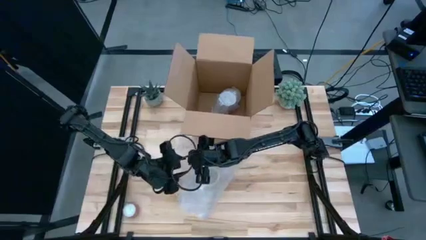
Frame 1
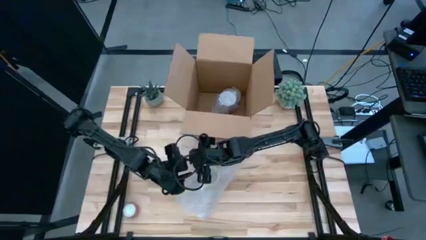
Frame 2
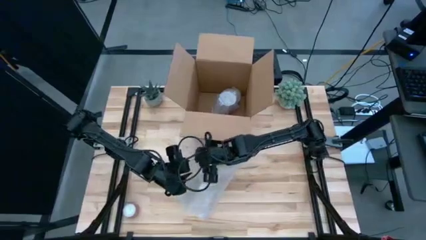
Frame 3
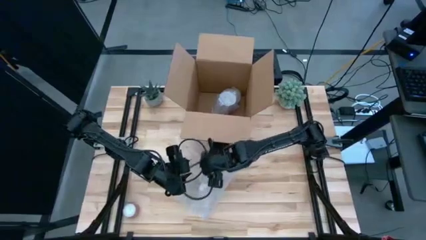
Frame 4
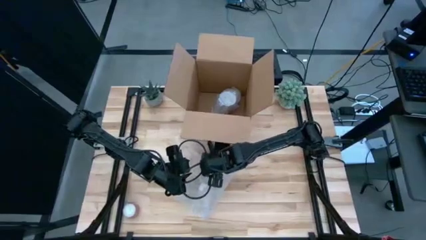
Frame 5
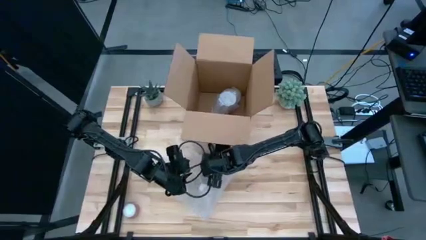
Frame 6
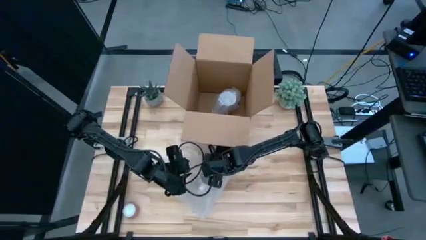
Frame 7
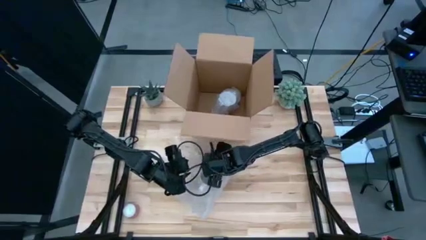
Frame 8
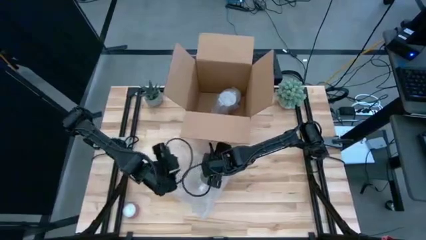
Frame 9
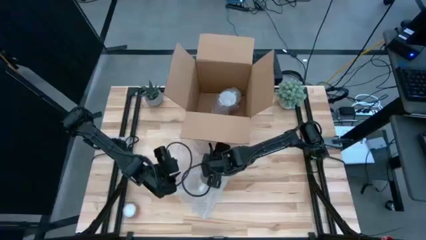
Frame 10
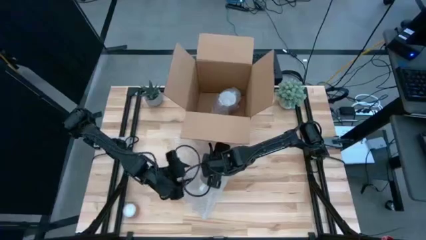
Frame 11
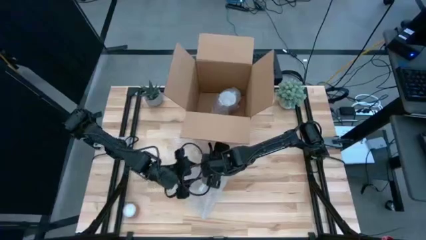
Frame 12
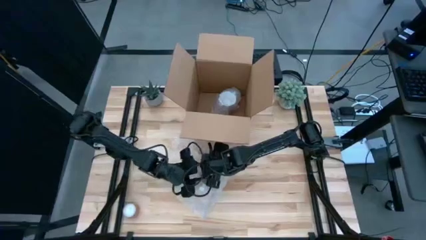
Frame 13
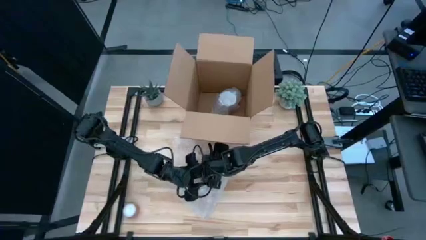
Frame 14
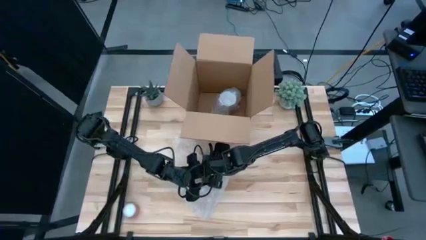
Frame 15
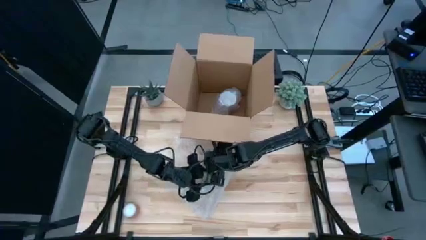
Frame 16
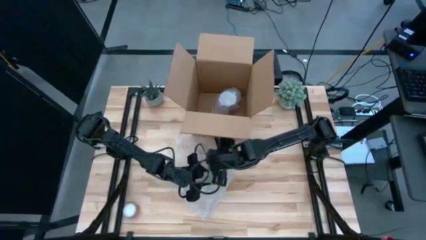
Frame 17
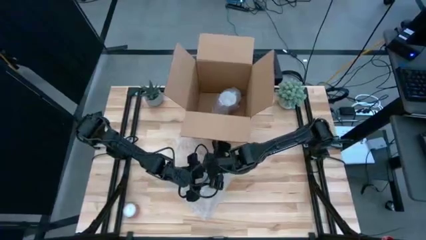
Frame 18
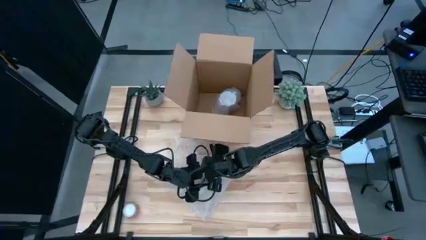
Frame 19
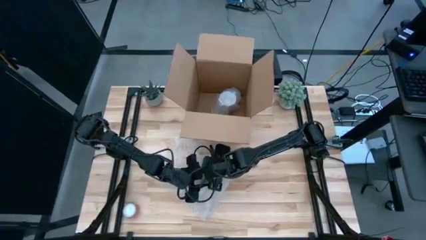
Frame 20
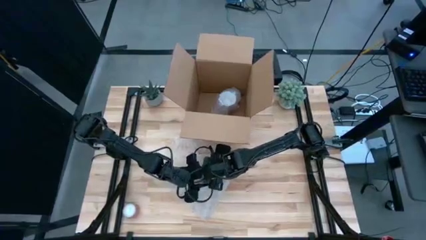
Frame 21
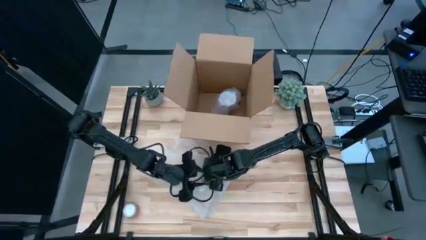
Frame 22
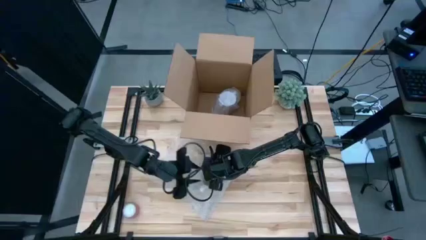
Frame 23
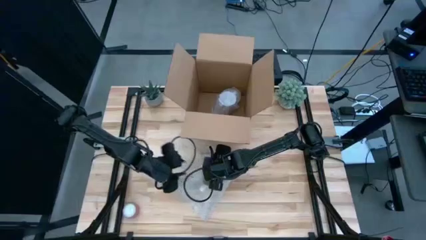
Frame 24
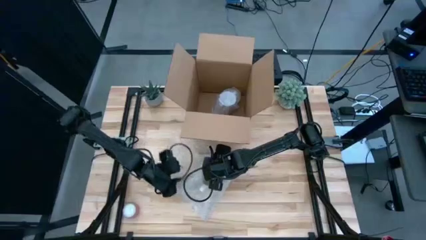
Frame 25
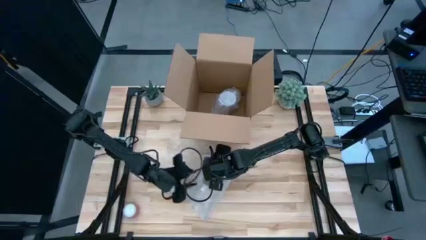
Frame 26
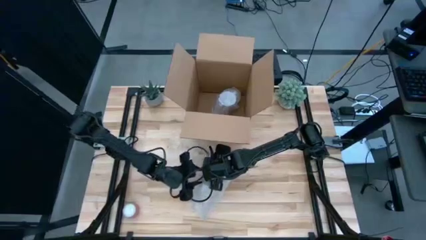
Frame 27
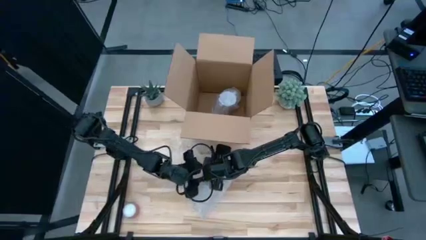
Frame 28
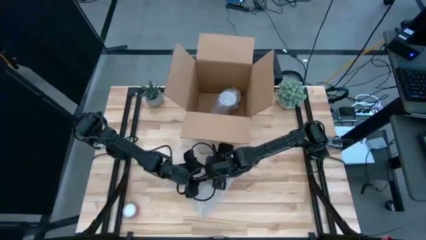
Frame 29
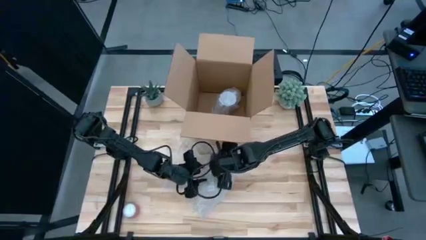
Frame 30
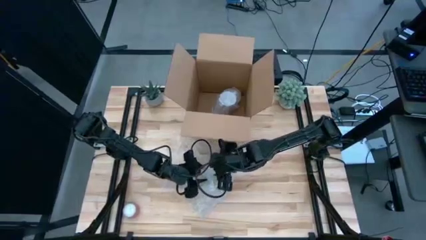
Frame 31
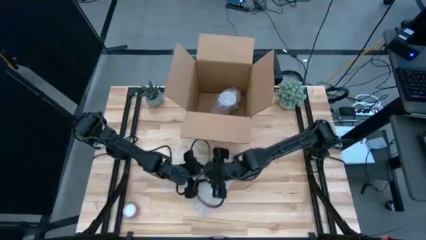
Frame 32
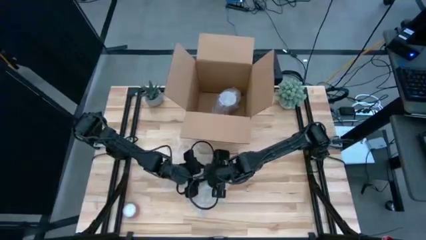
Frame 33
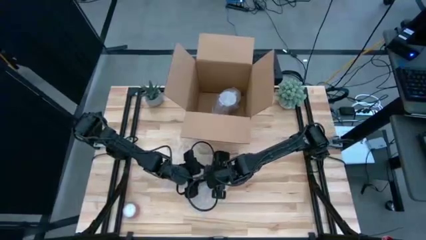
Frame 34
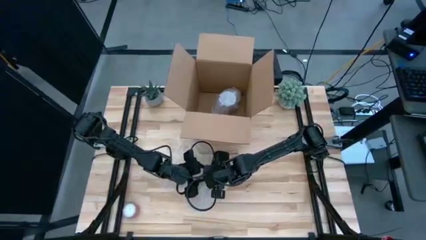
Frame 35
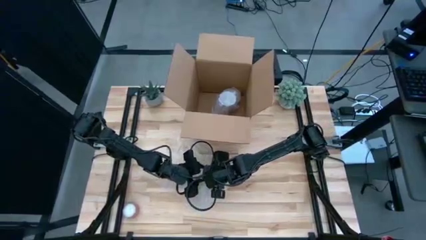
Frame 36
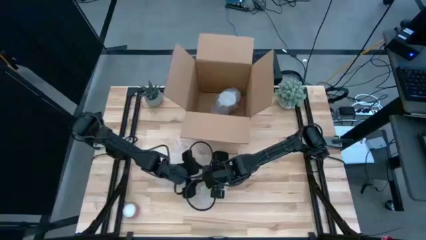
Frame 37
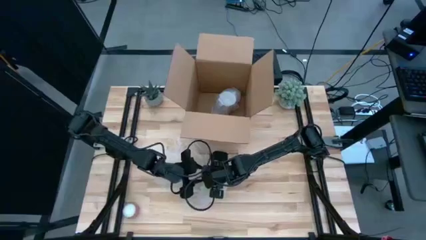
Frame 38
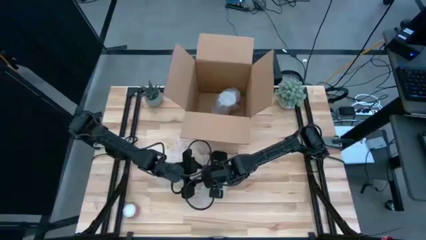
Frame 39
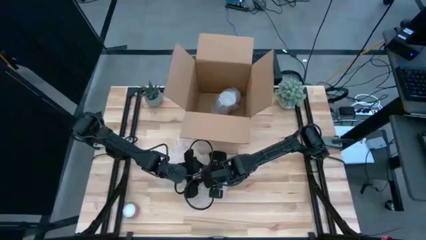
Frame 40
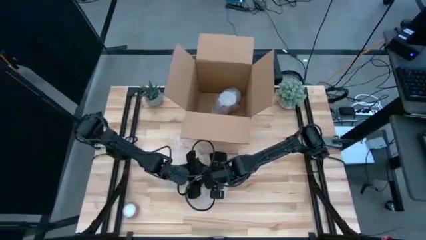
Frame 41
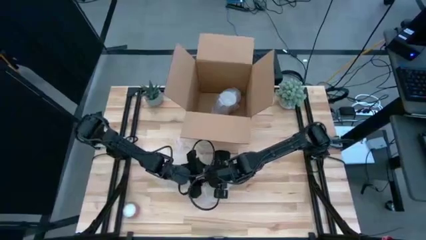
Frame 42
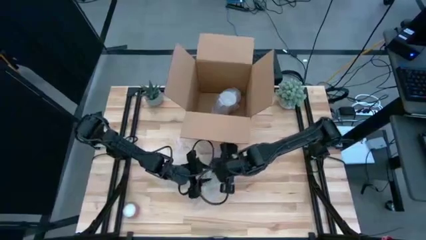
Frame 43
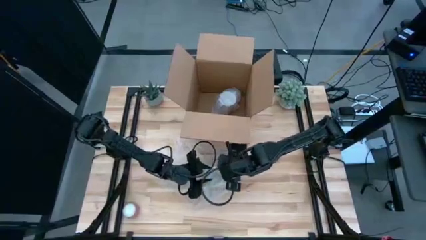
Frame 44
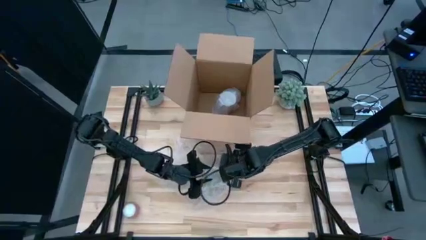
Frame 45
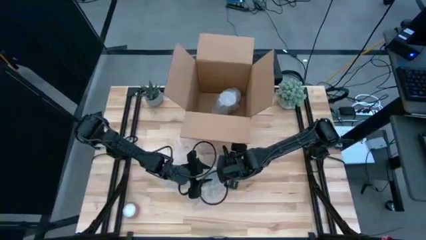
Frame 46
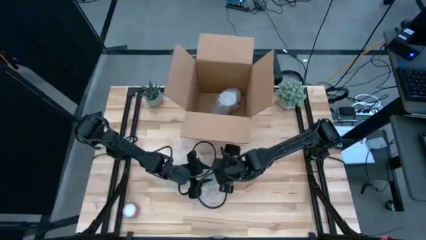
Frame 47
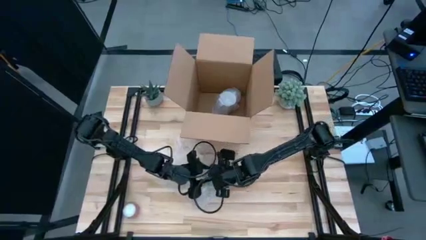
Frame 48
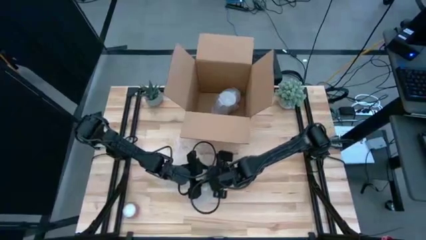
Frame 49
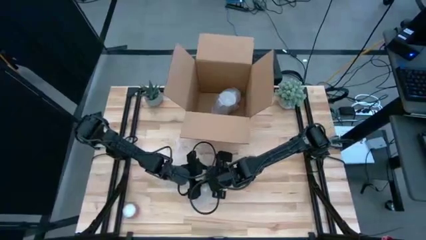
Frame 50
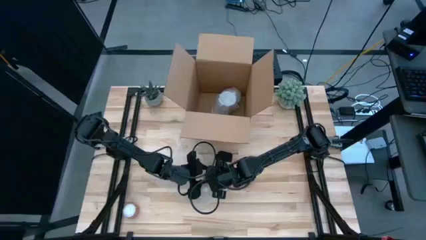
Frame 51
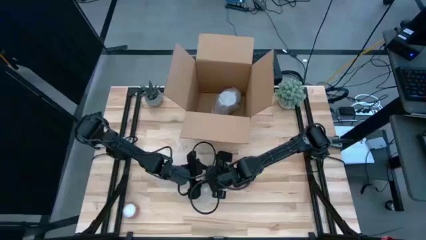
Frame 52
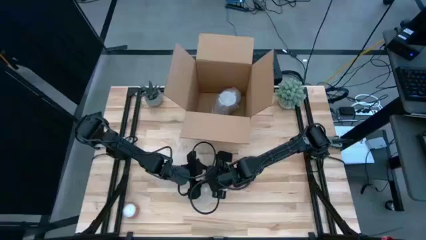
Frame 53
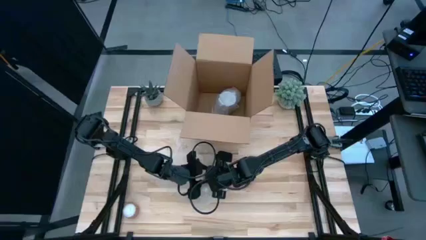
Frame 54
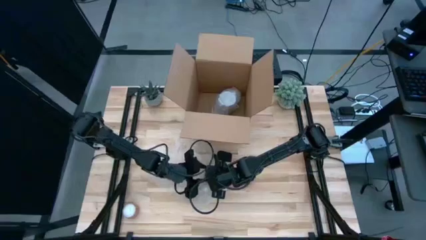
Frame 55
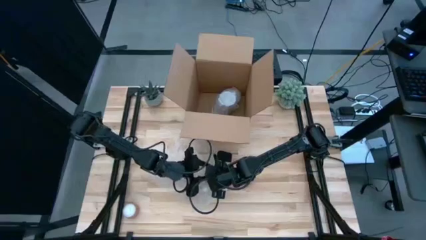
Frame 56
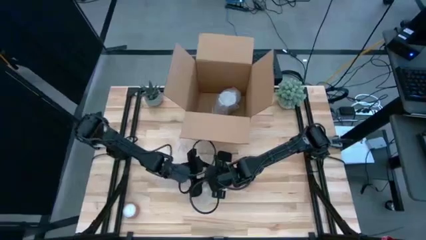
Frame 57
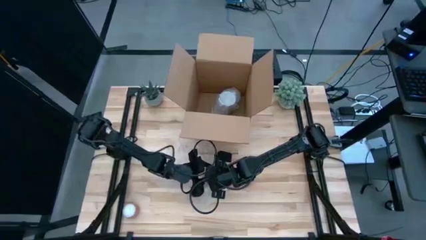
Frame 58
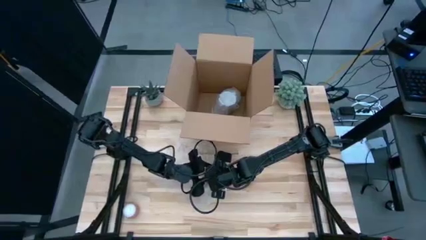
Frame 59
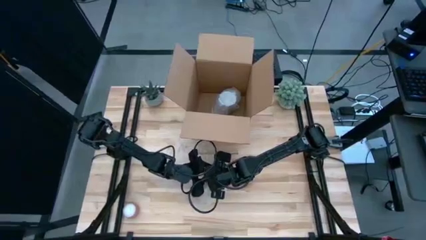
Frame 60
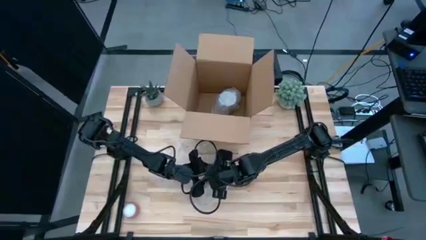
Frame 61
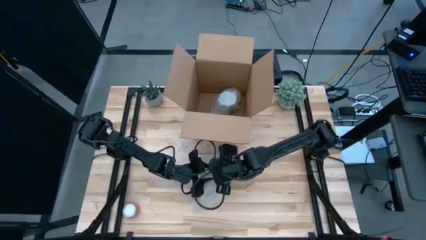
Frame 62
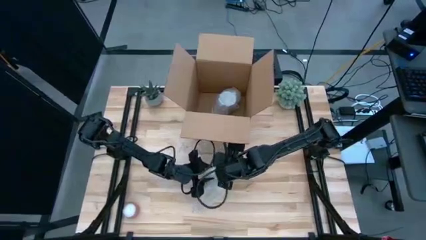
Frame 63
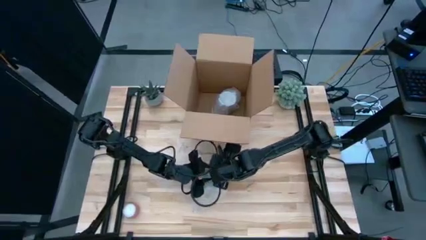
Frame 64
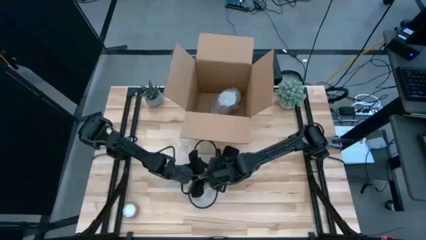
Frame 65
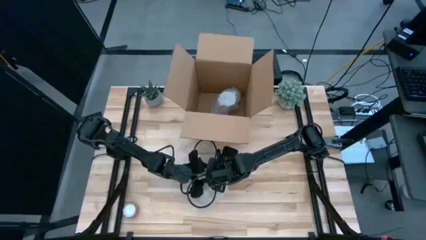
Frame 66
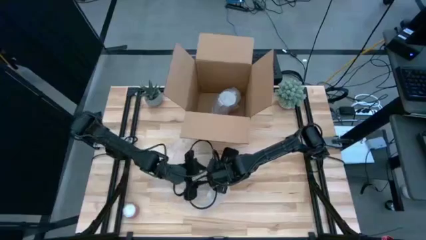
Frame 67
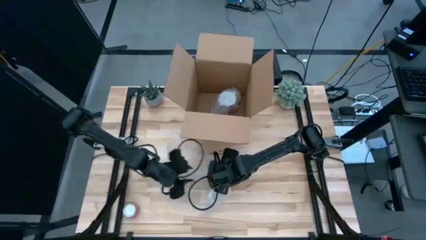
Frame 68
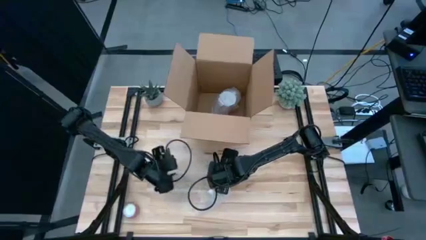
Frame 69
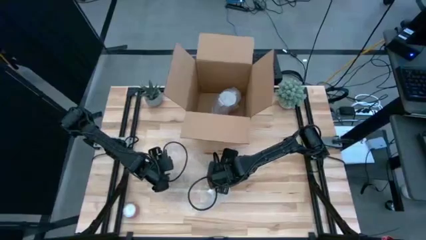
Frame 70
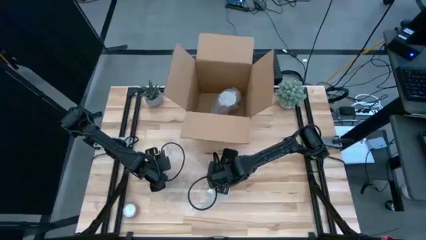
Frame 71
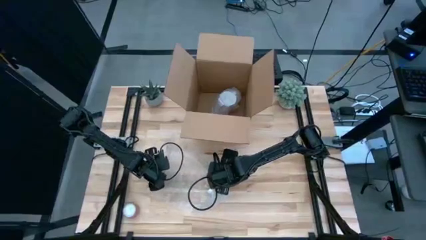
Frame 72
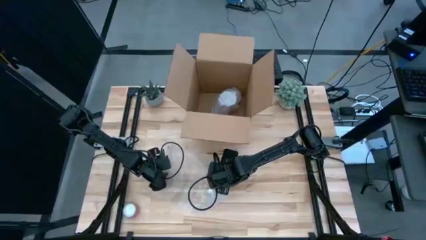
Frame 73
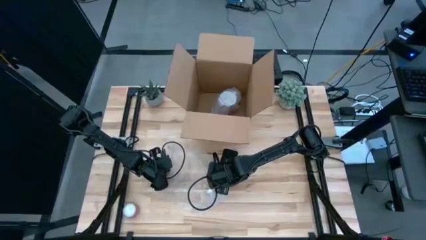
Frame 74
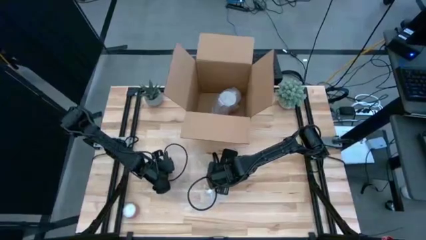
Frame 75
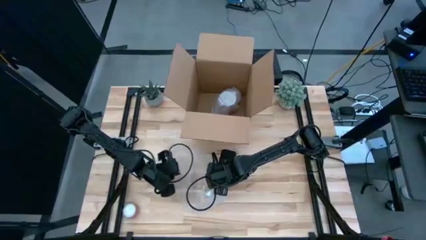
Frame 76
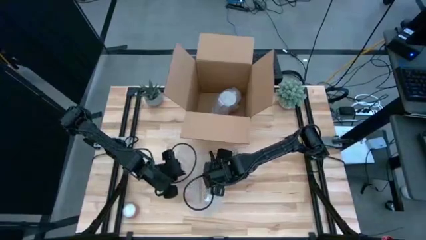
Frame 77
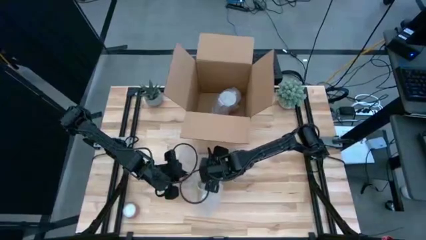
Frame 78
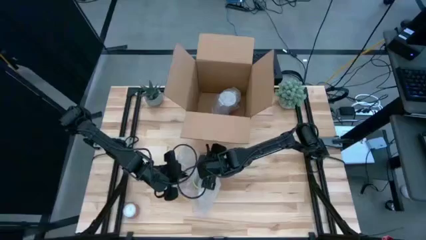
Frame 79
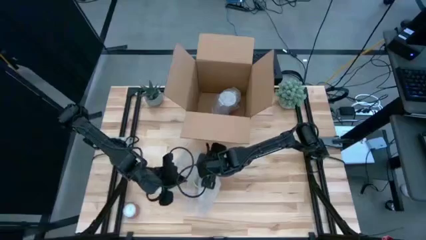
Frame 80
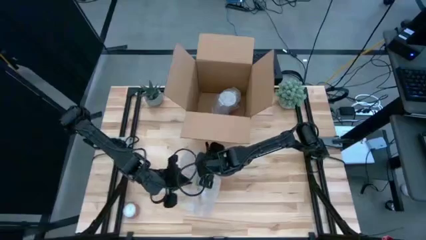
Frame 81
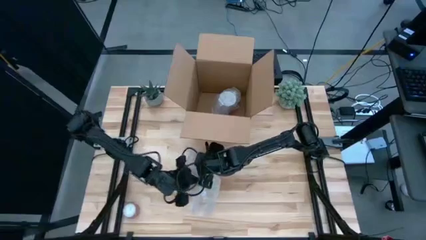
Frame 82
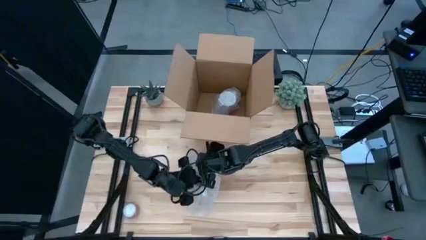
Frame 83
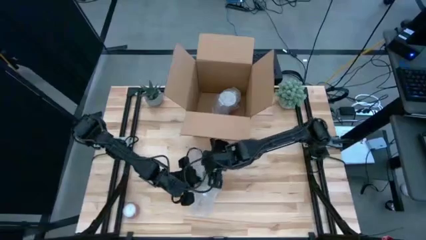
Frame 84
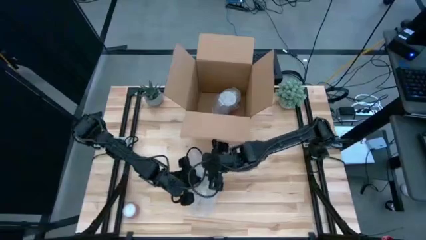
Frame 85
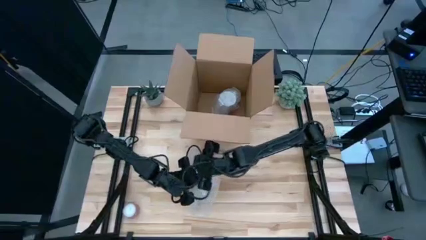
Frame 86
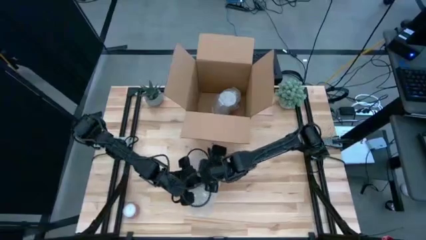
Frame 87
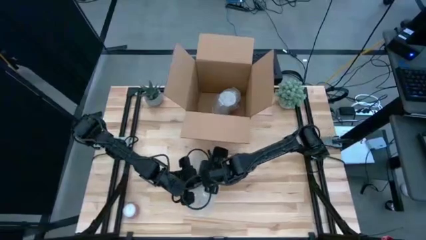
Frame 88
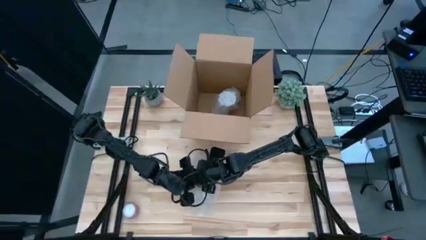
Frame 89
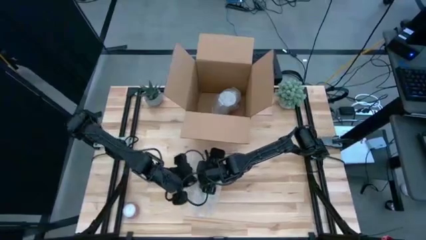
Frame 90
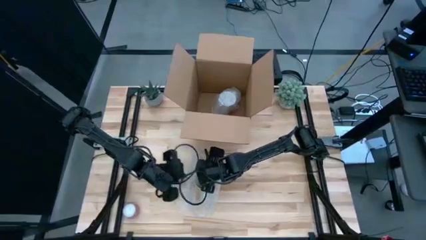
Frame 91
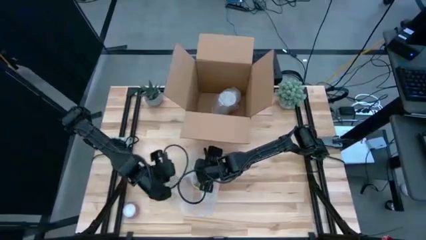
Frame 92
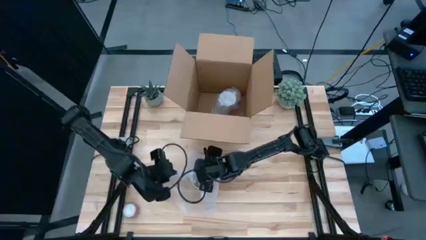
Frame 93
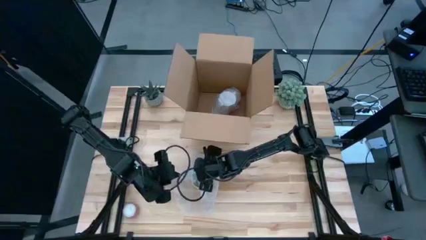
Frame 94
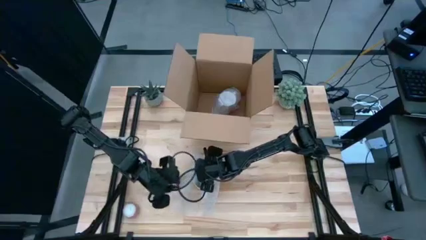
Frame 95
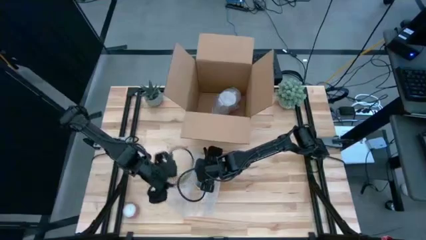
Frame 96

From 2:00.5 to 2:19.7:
Task: wrap mug
Wrap the orange cup with the bubble wrap
